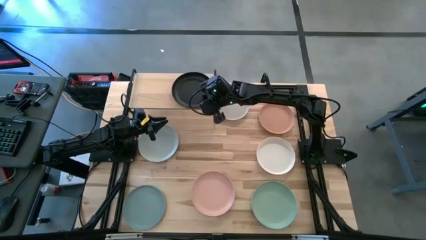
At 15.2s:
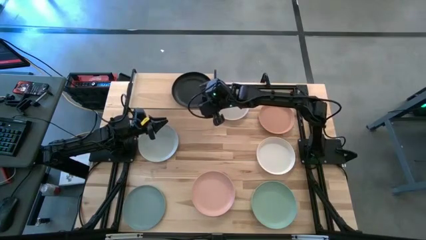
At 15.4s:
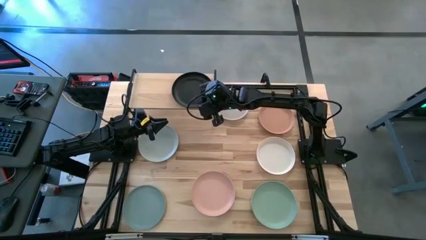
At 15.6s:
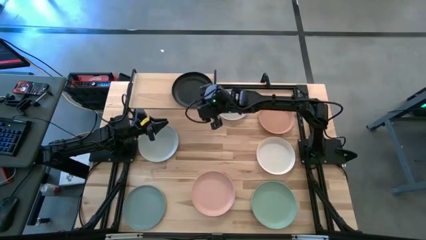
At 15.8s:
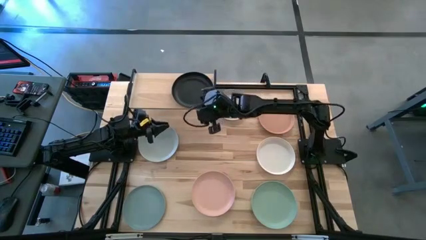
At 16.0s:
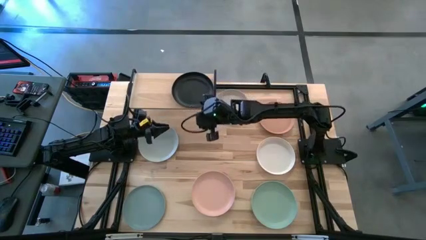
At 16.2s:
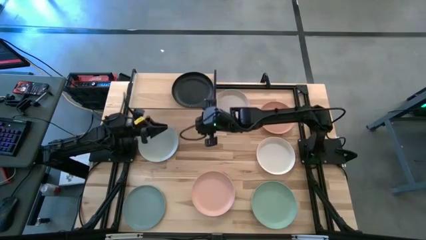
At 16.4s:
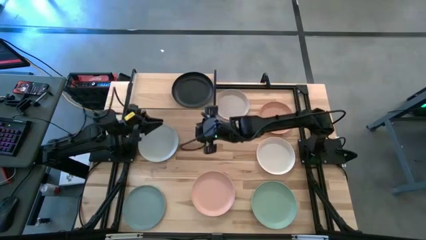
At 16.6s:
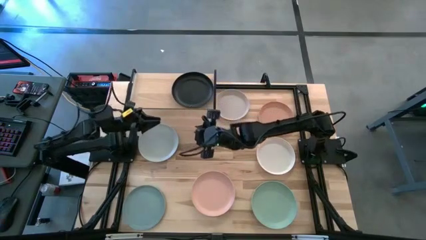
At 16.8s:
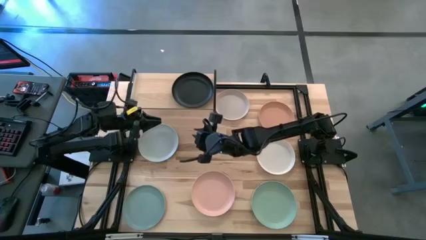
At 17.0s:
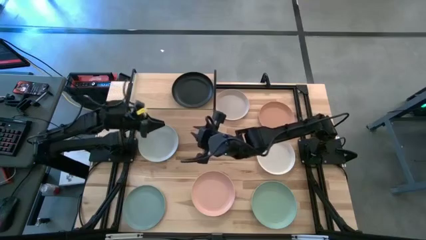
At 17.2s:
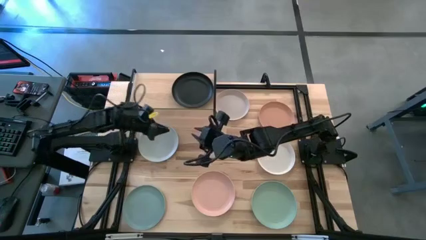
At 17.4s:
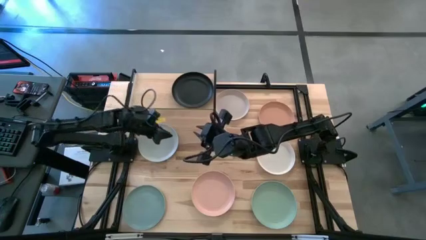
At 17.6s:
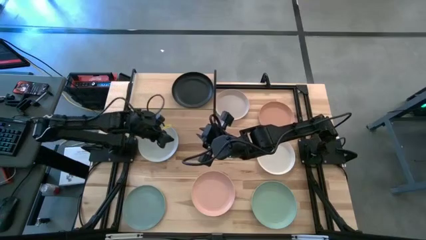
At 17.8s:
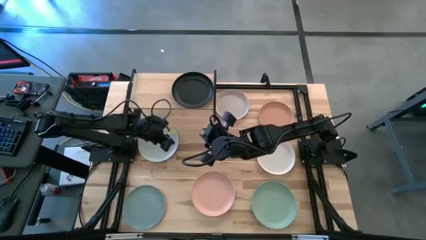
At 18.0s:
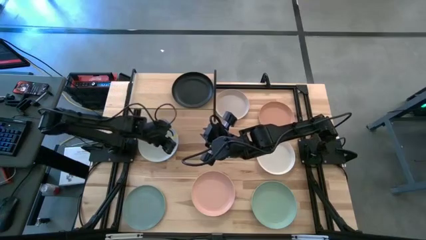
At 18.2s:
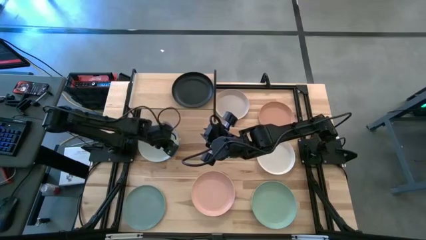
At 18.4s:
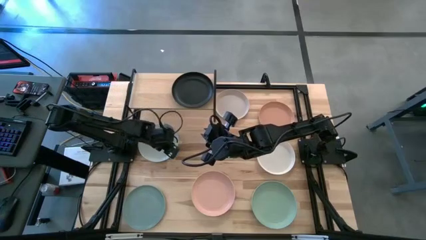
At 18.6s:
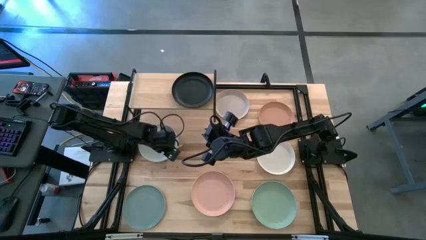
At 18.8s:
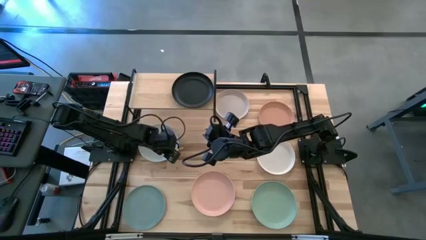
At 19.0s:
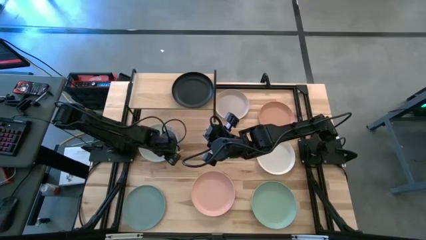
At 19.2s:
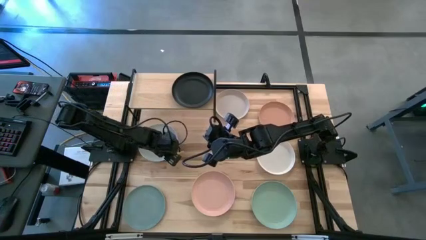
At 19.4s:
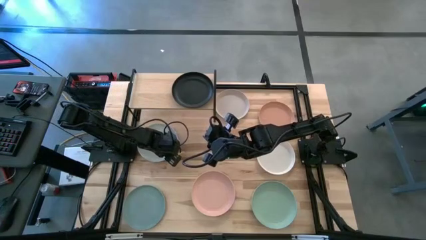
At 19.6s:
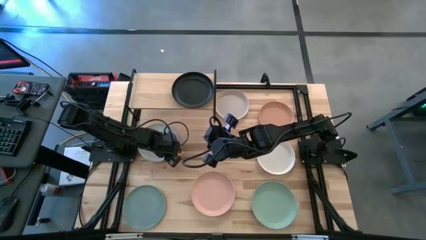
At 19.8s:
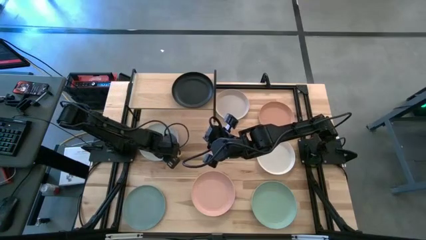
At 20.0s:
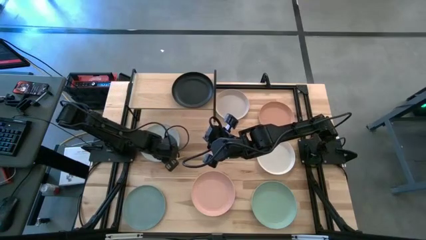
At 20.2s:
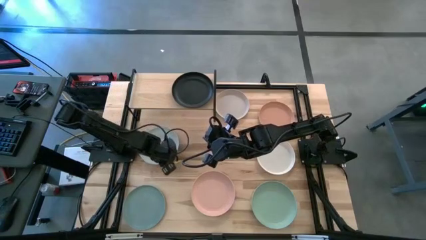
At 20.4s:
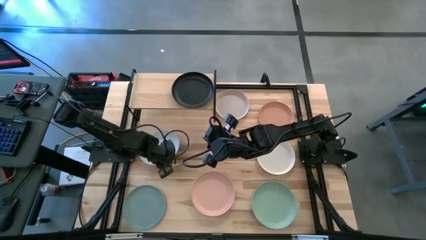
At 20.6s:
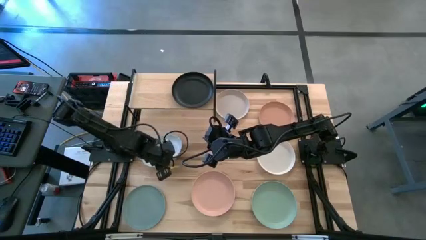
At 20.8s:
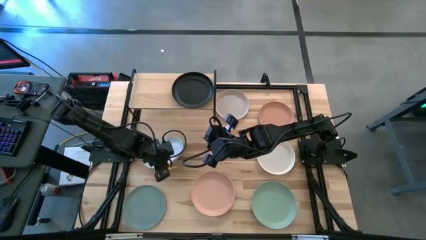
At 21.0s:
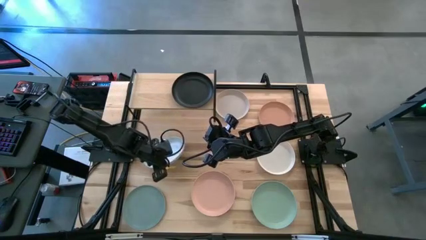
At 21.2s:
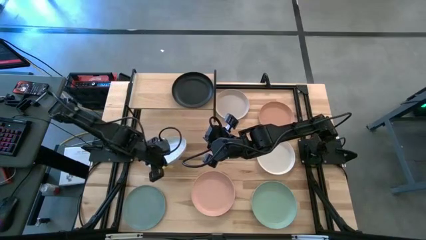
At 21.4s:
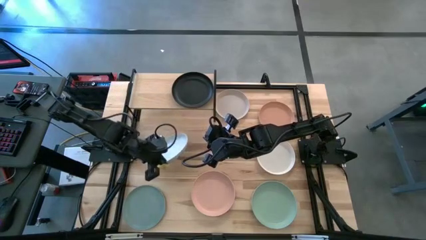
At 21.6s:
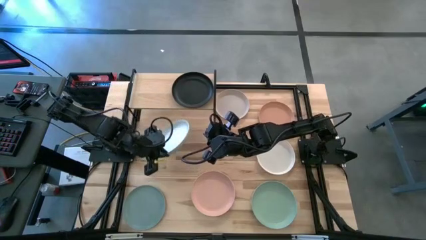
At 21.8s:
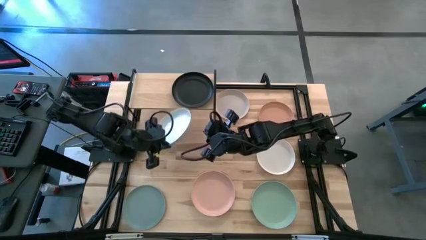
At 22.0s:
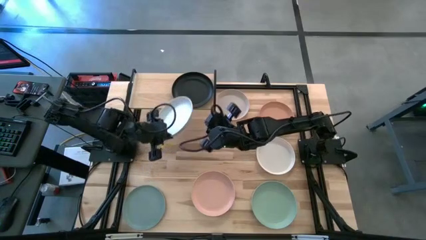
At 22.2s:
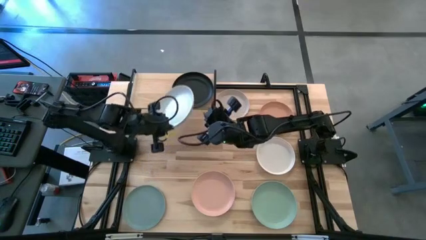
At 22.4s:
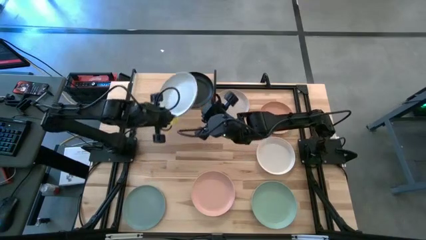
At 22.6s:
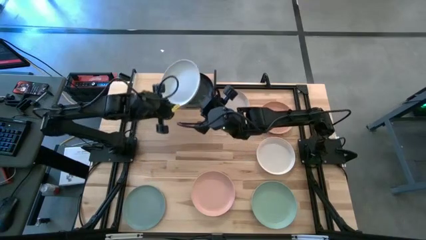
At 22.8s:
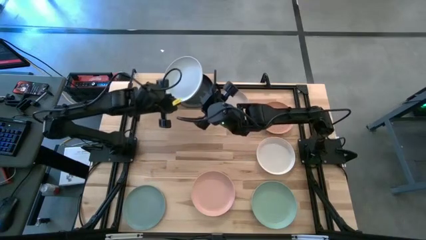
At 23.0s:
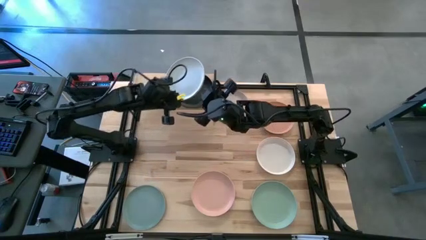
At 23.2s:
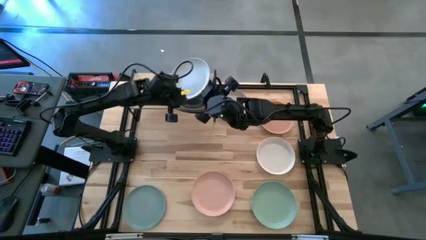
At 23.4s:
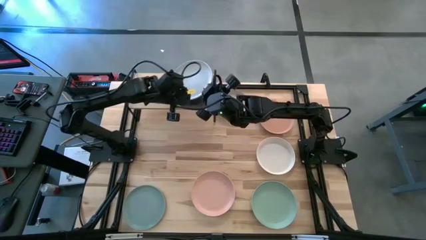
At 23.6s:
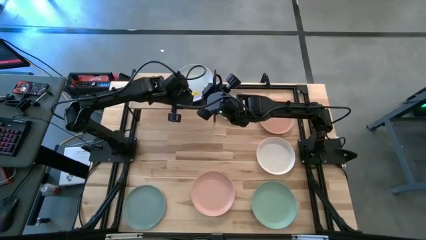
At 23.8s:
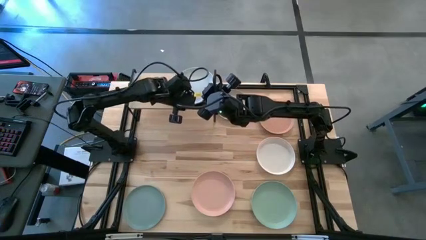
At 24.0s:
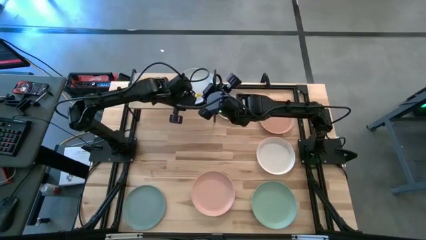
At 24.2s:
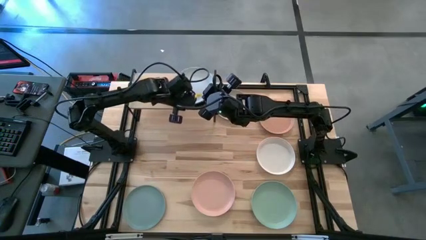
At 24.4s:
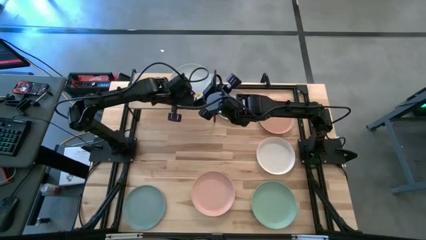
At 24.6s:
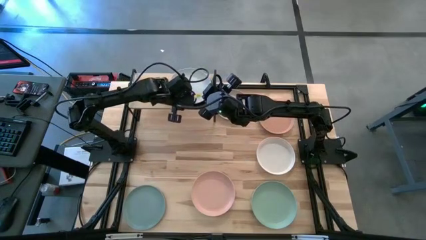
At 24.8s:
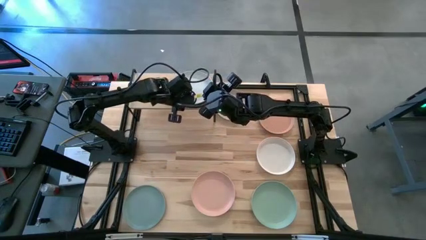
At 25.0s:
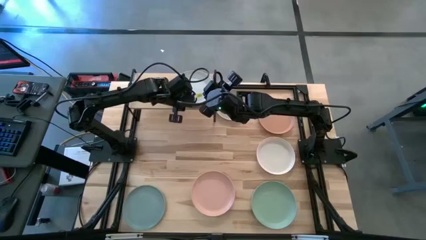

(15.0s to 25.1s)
Task: Place and stack plates onto a shelf
Stack the gray plate on top of the black plate on the shelf

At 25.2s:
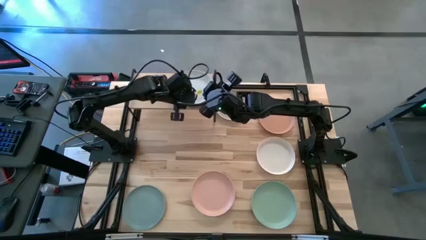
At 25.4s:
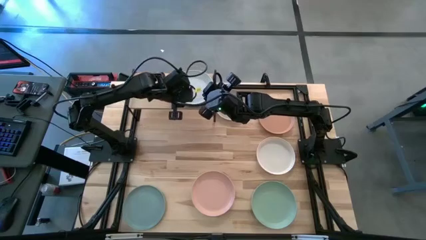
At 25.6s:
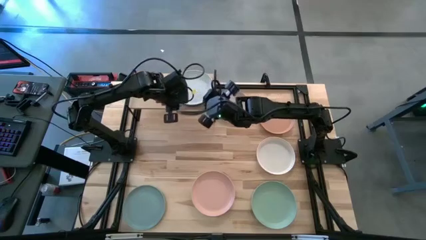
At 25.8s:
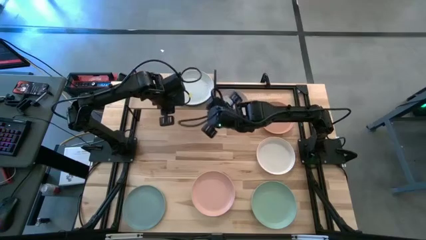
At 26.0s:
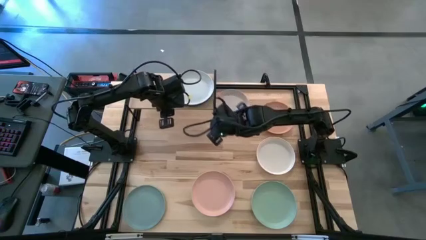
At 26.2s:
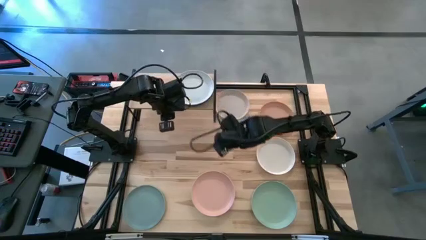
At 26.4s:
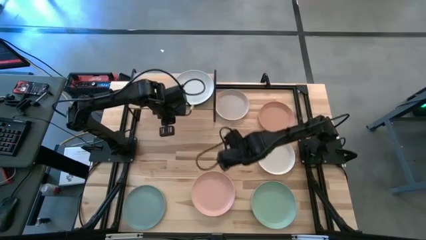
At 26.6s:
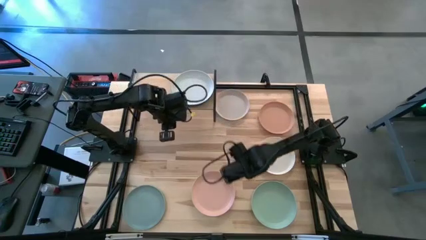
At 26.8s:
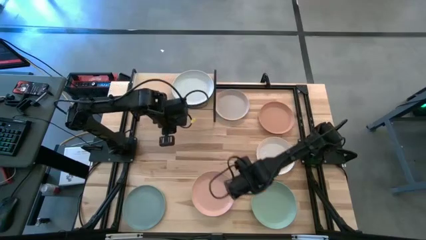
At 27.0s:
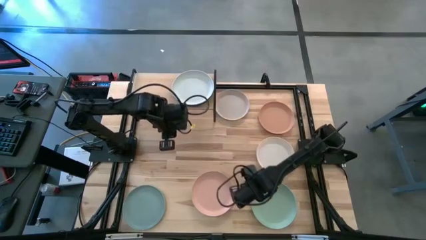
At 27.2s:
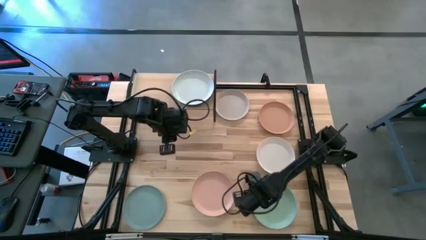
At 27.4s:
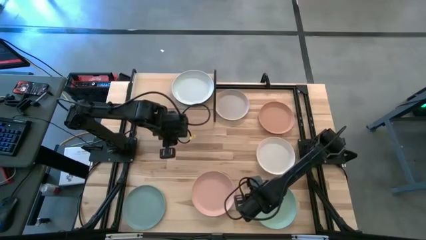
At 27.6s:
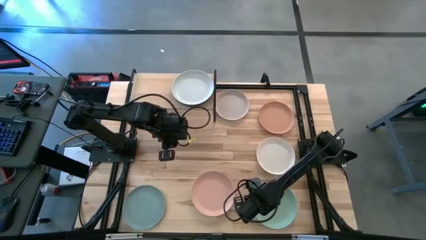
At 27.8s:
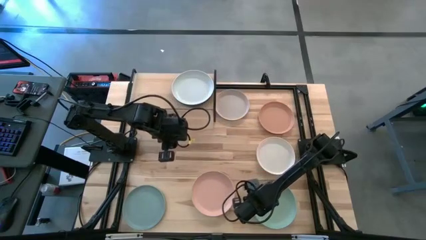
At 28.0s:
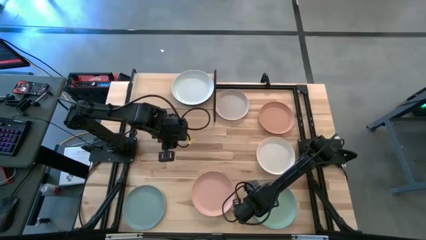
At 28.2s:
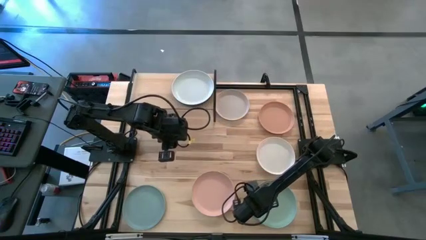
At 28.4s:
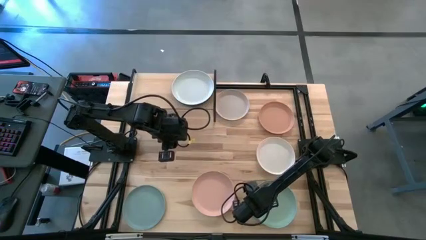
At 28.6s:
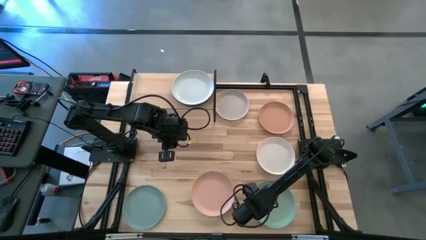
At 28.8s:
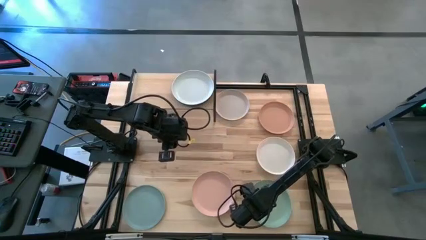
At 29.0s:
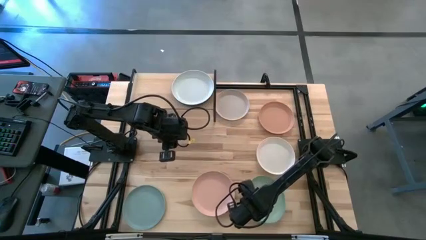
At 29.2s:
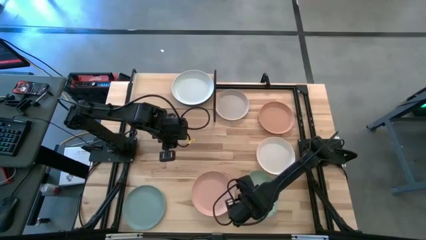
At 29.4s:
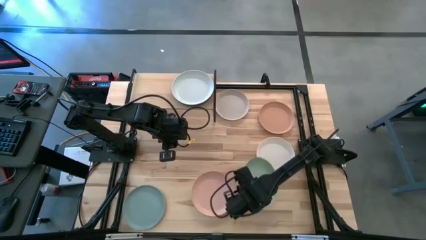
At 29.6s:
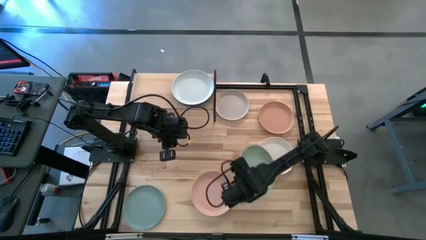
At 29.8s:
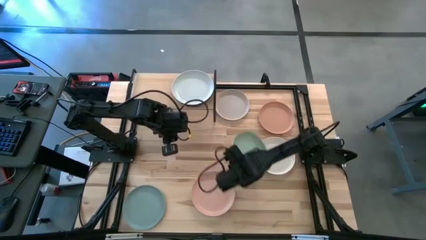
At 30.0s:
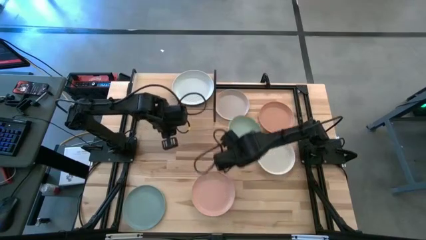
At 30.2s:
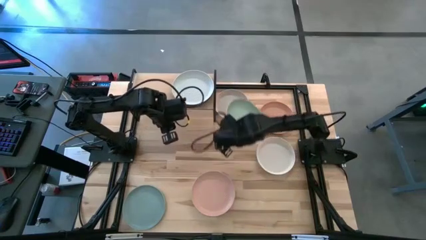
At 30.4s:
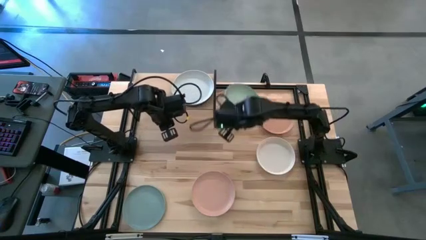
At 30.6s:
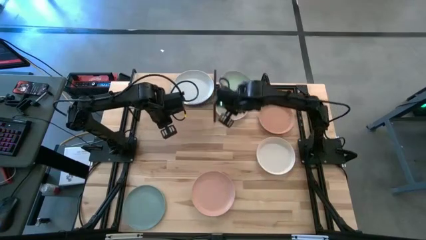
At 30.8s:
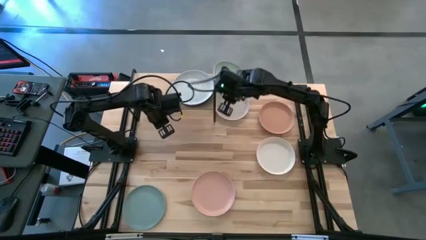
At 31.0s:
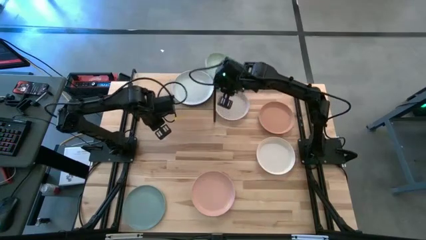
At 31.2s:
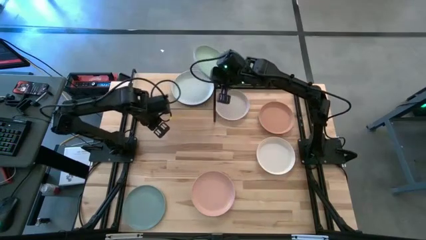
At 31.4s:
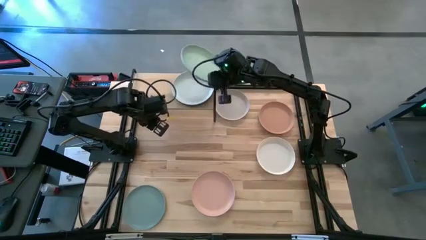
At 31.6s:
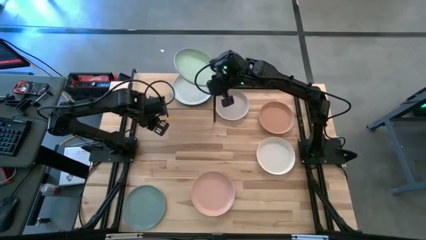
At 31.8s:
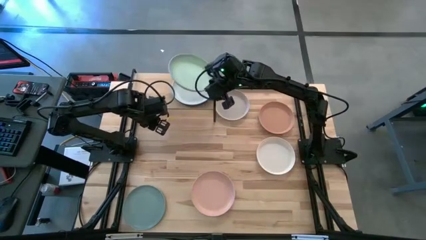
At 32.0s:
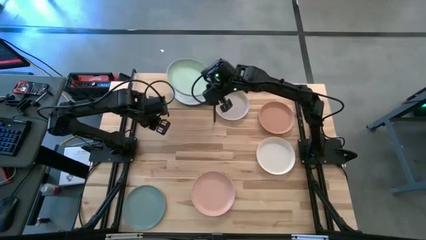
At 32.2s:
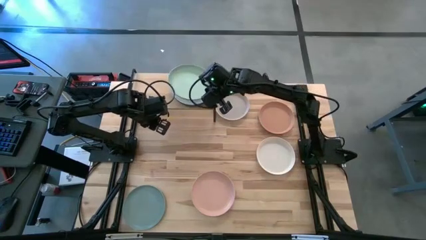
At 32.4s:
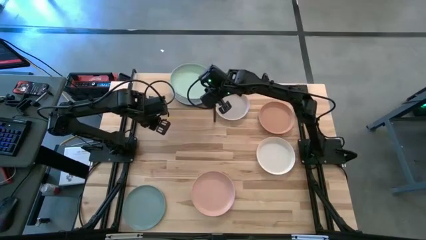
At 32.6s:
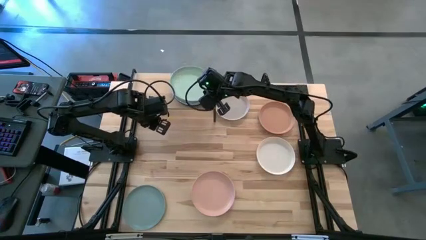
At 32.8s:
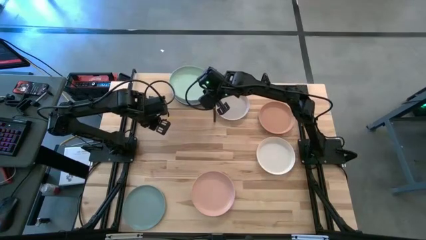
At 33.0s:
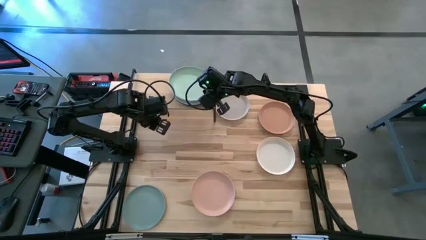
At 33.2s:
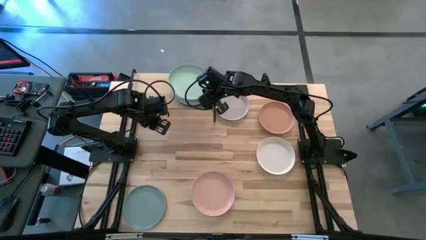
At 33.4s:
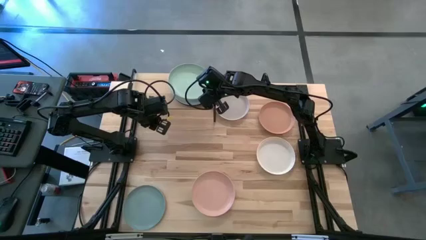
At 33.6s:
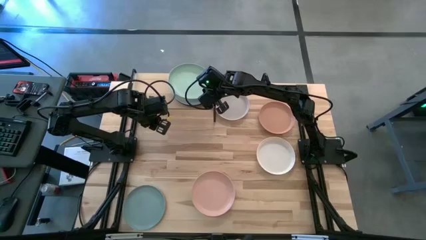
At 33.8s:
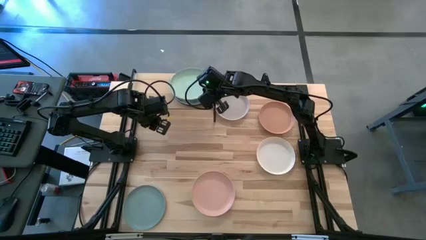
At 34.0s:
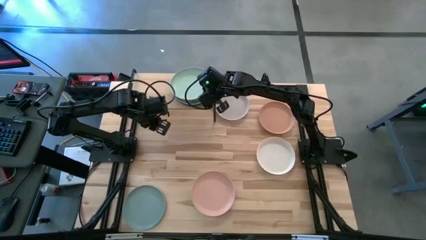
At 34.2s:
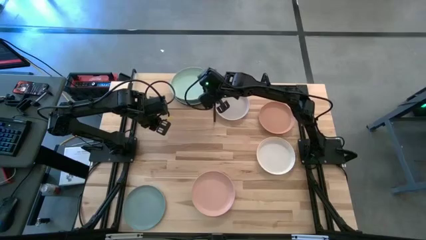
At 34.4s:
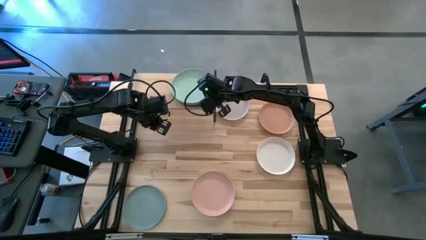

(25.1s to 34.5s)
Stack the light green plate on top of the gray plate on the shelf
